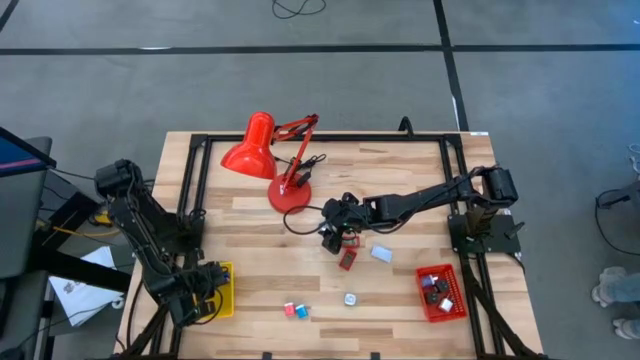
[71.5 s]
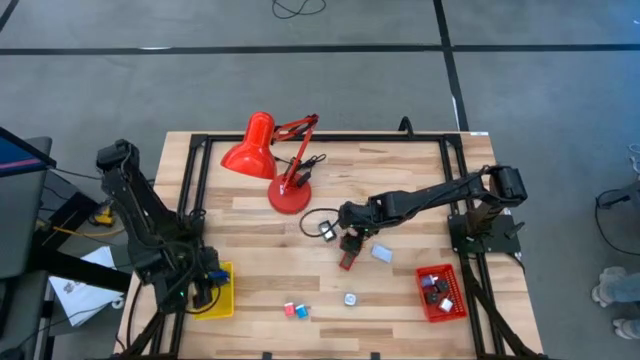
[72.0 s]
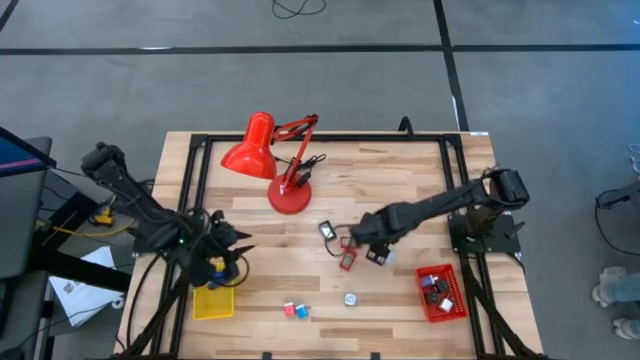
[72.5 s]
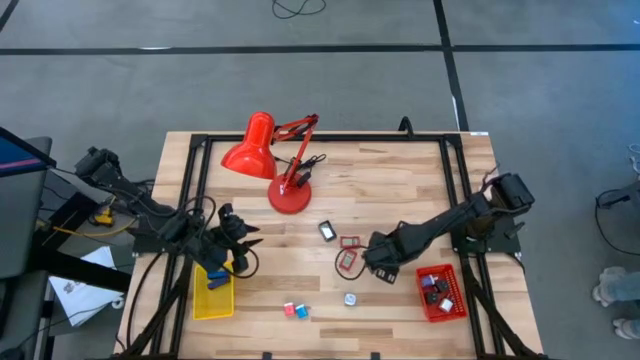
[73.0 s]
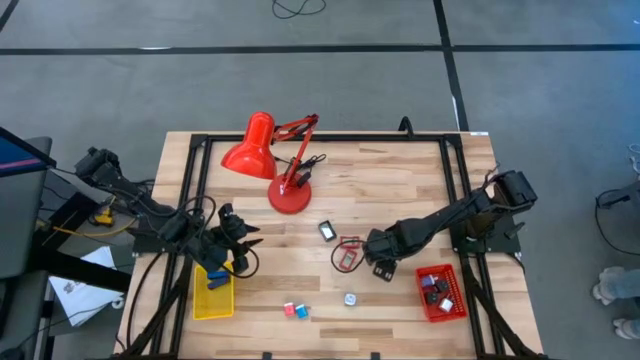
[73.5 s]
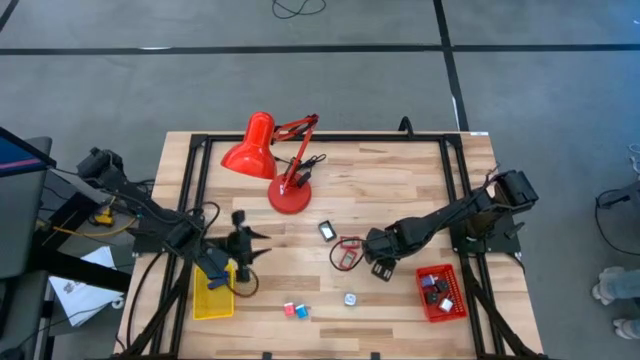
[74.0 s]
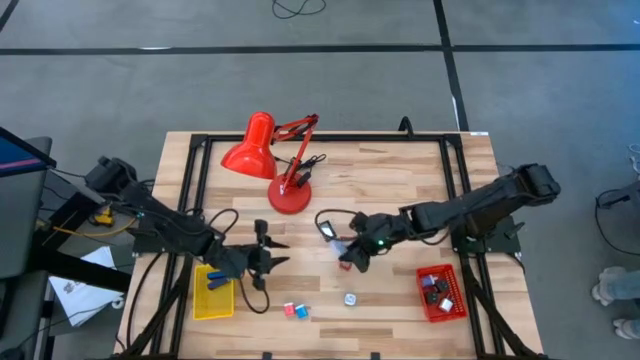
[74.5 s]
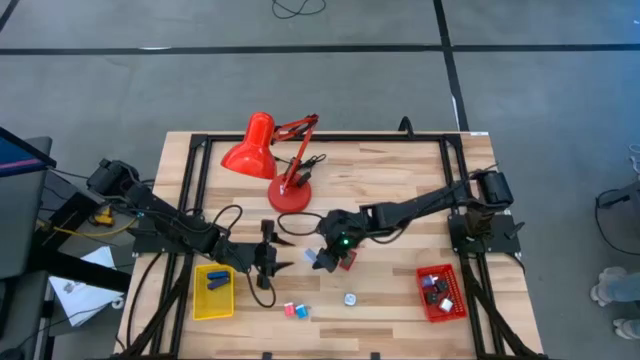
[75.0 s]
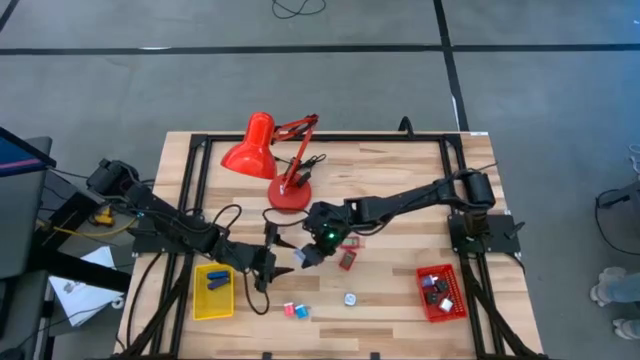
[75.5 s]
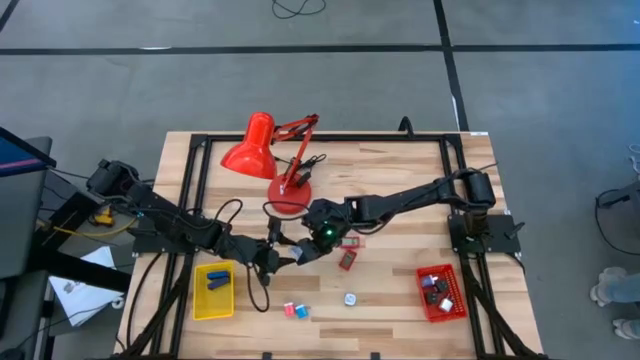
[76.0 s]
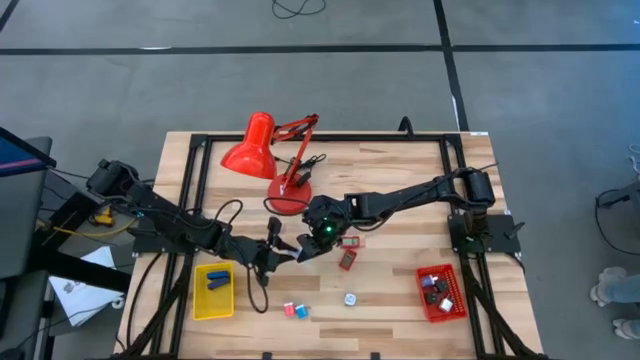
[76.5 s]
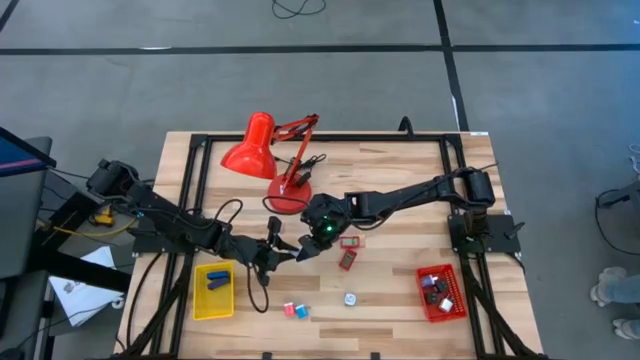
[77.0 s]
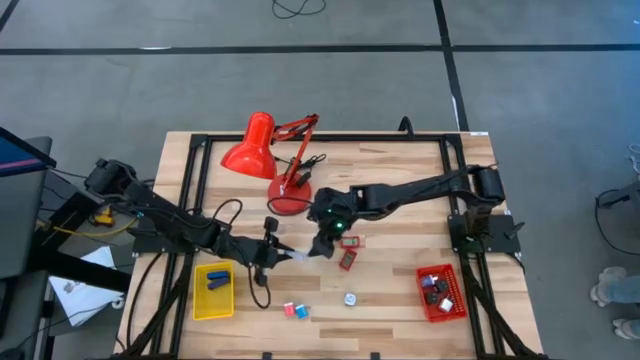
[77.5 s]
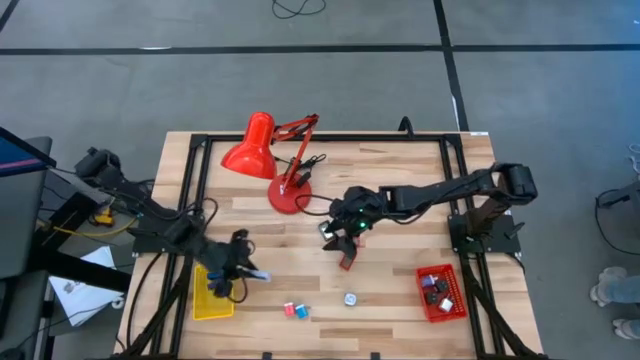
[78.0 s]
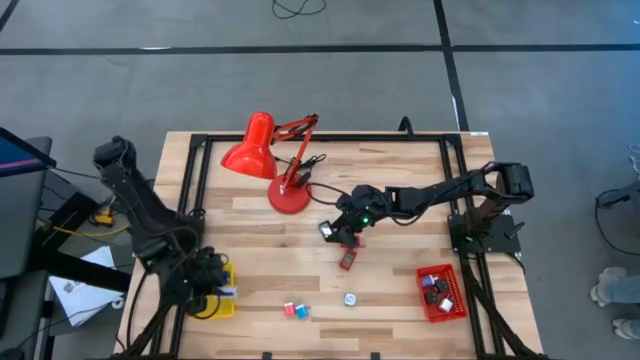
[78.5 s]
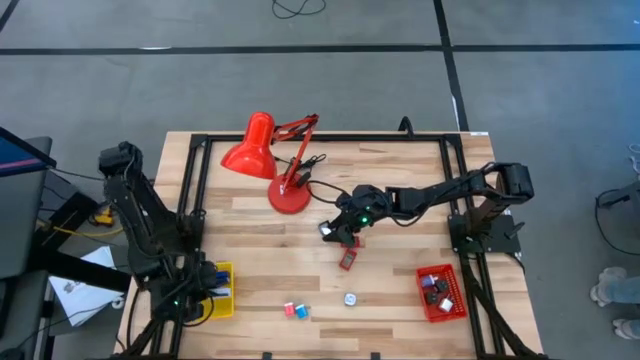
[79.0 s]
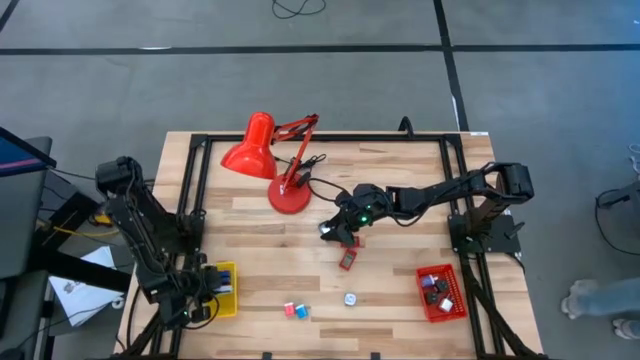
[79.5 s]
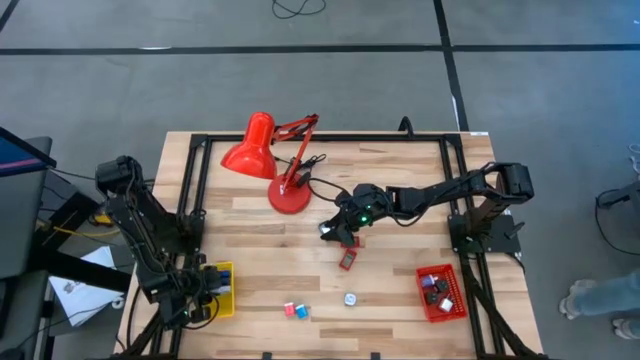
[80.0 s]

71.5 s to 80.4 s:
Task: Pick & Place Office items
Put the white digital timer into the yellow bin

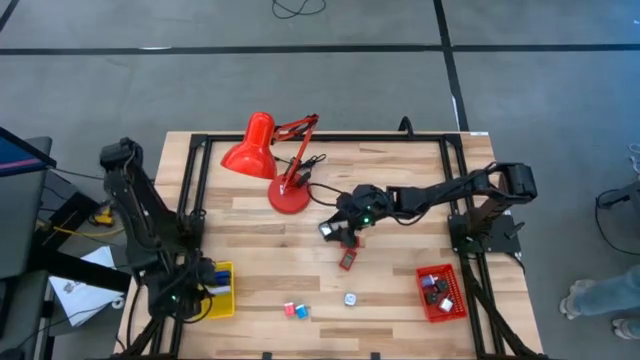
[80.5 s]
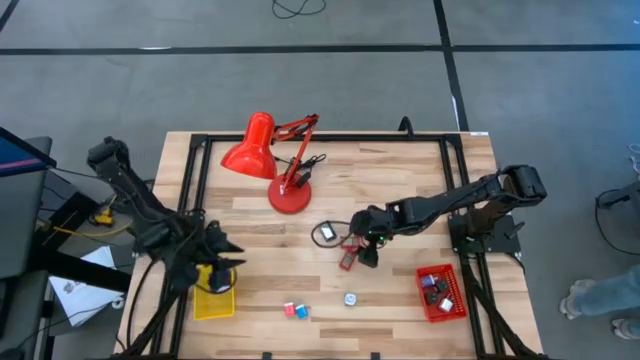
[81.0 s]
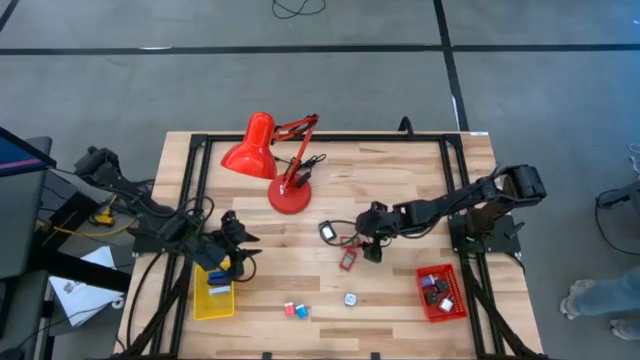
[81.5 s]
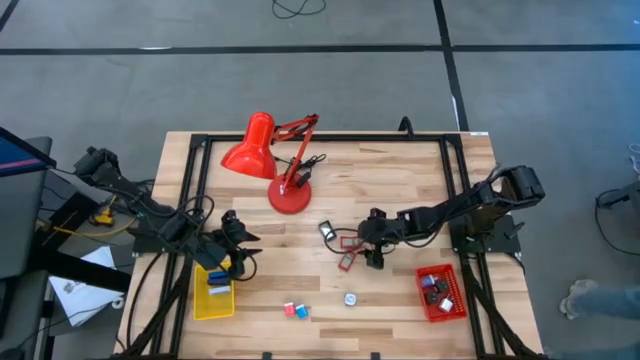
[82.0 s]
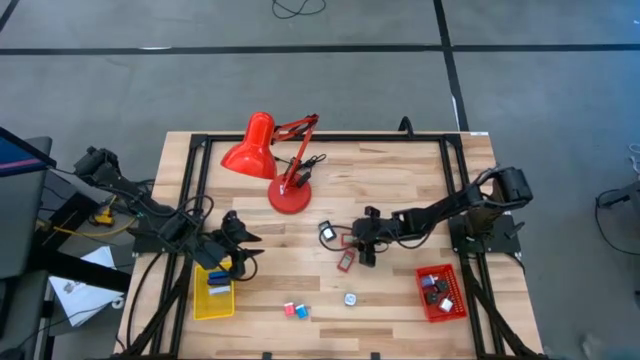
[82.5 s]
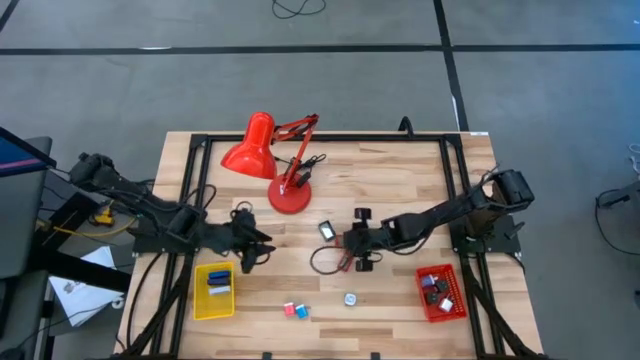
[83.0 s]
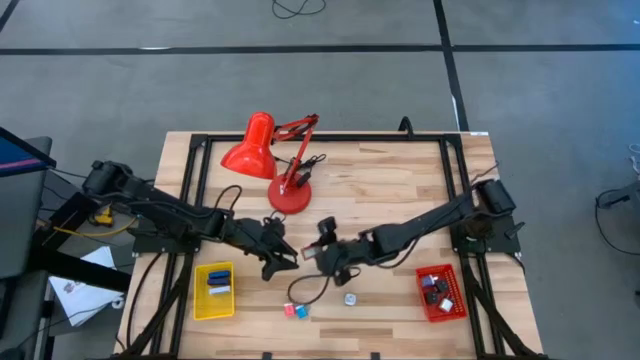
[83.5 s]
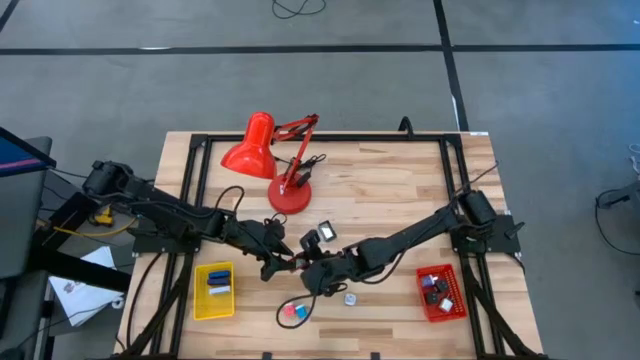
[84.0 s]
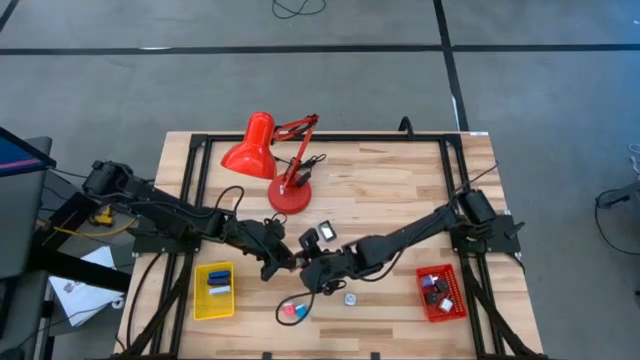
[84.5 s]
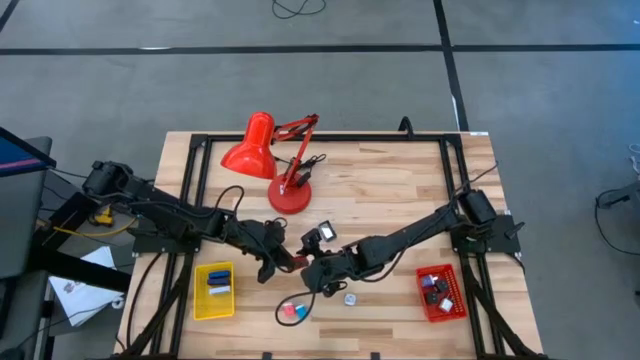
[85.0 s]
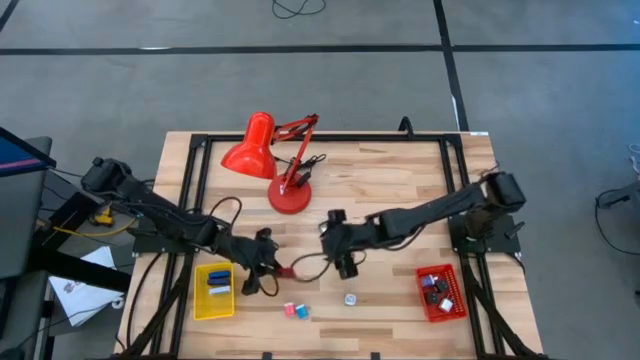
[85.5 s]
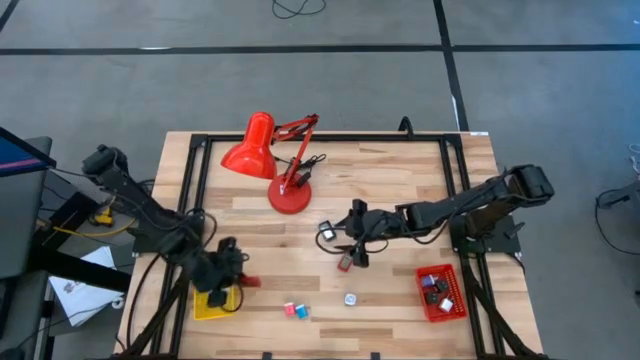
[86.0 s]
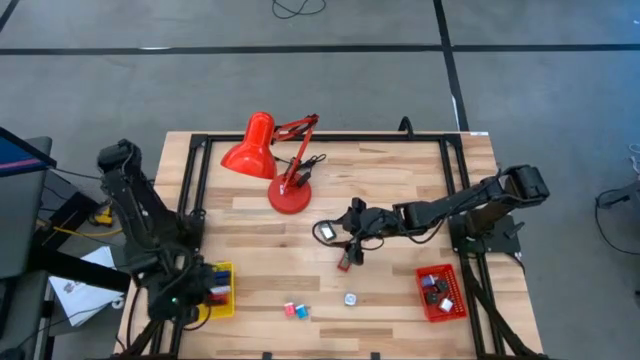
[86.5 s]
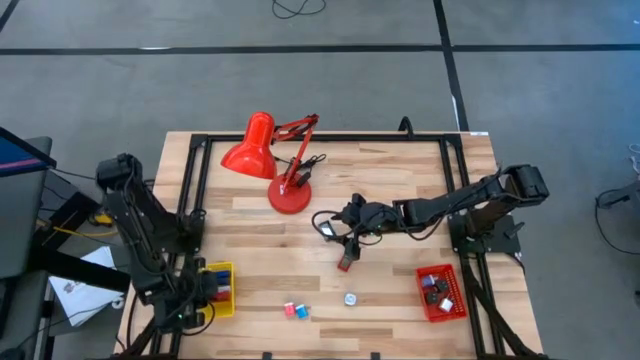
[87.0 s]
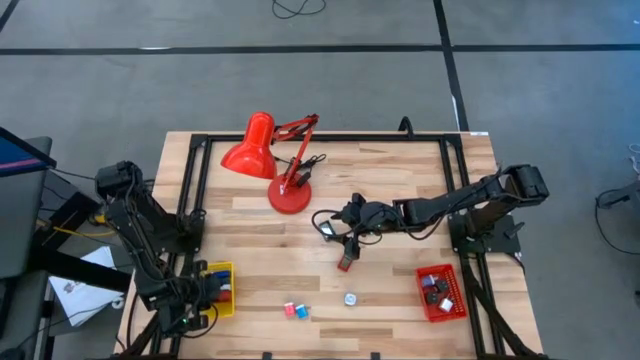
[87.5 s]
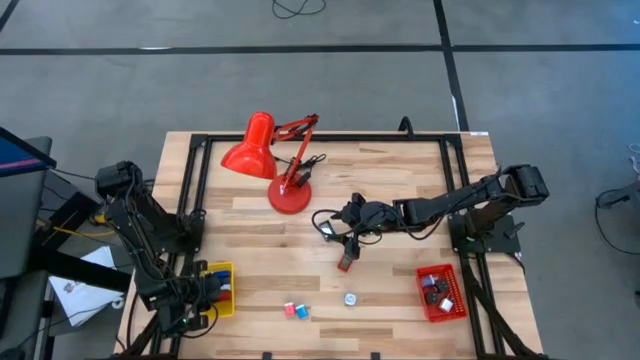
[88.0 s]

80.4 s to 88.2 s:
Put the top red digital timer into the yellow bin

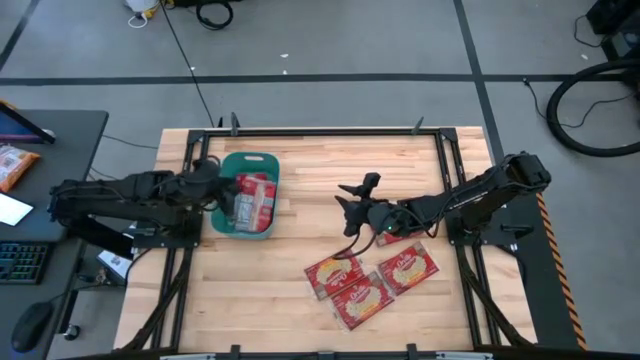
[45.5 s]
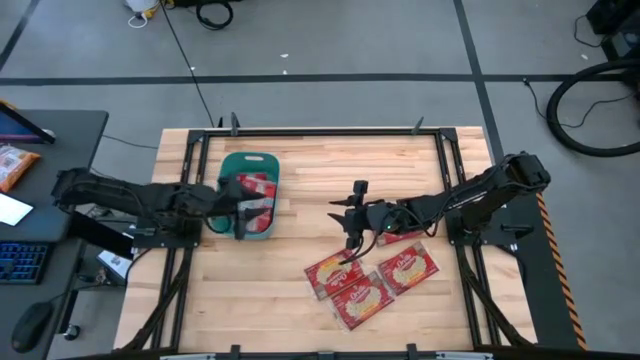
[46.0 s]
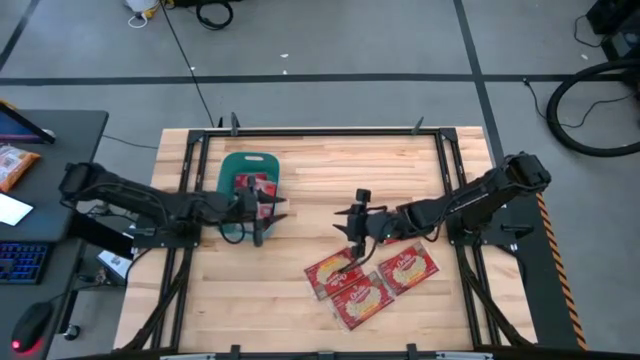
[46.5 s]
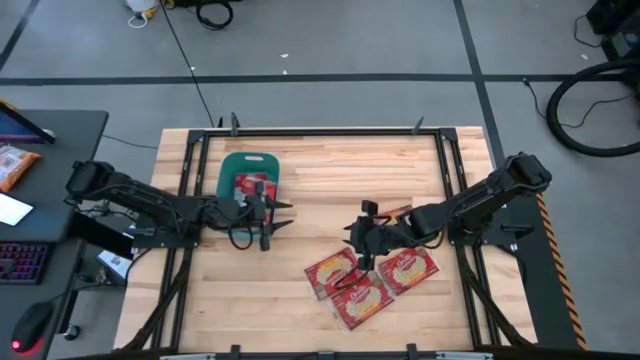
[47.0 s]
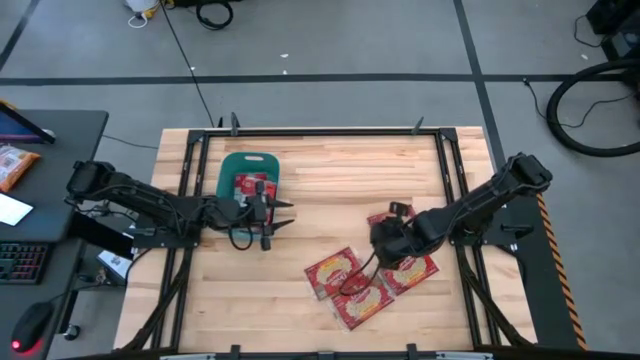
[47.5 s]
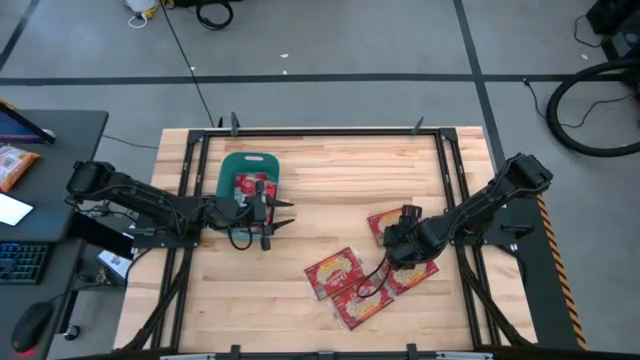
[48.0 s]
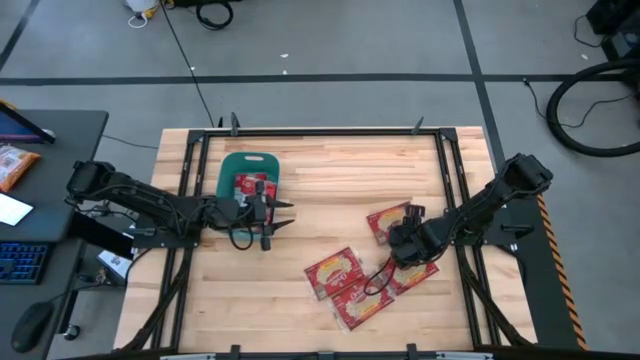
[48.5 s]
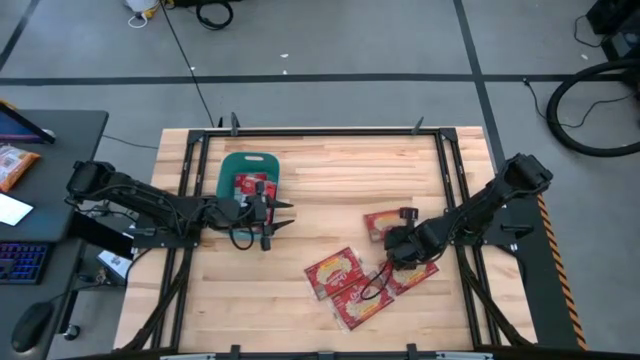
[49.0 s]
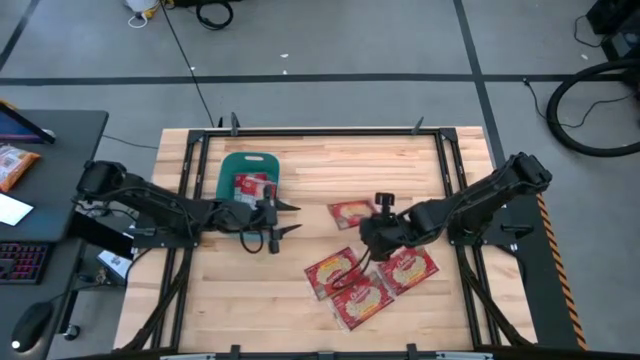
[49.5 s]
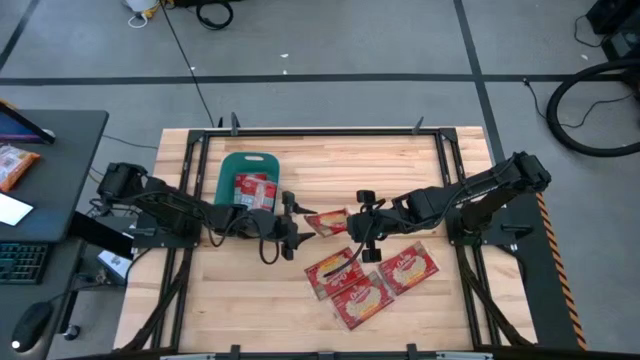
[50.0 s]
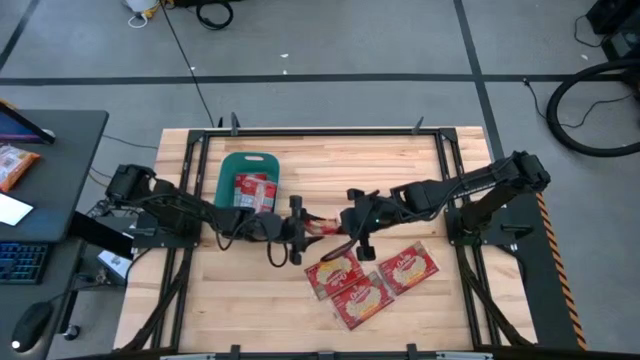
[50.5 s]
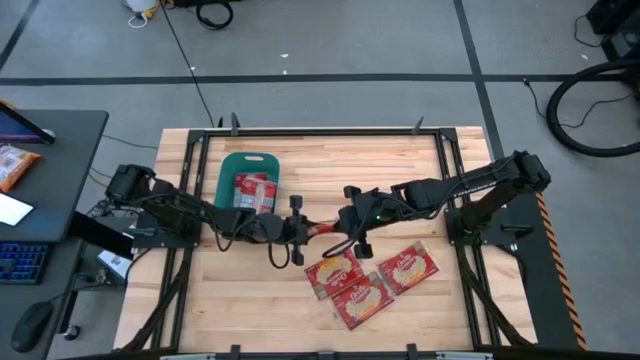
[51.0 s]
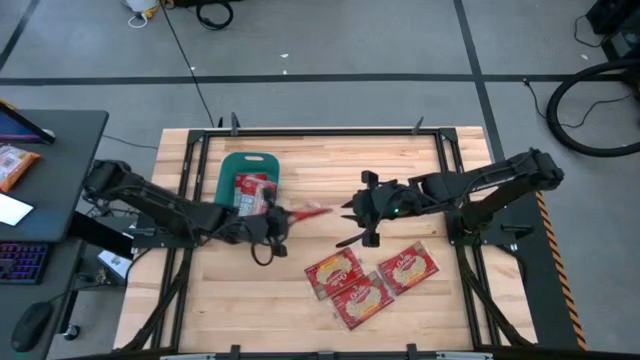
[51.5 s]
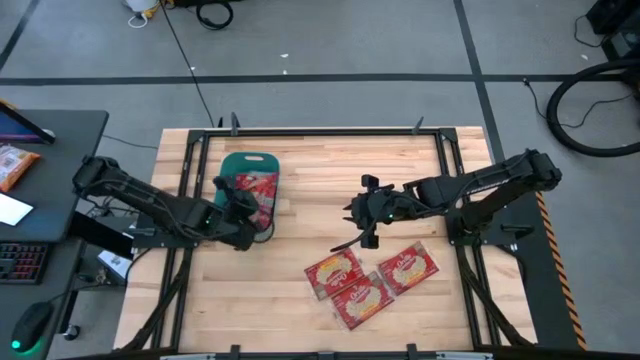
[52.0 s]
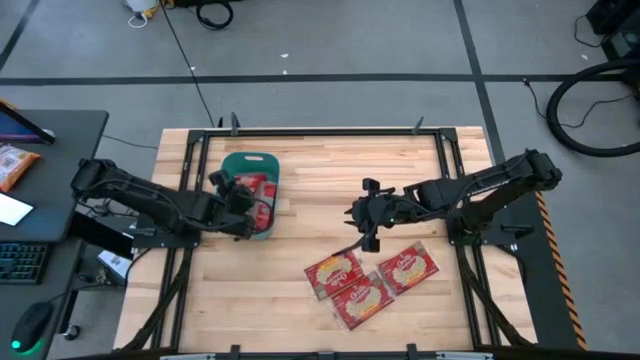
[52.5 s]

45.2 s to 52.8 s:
Task: Sort popcorn bags into baskets
Put the red popcorn bag into the green bin
